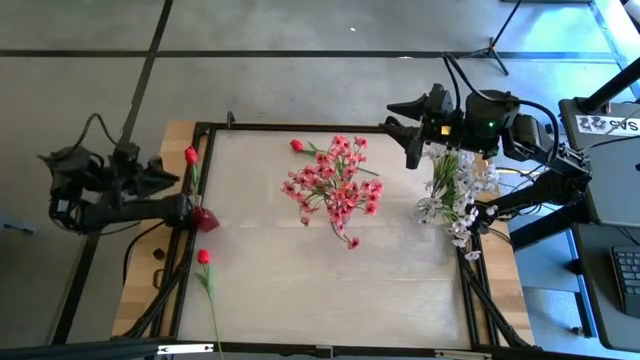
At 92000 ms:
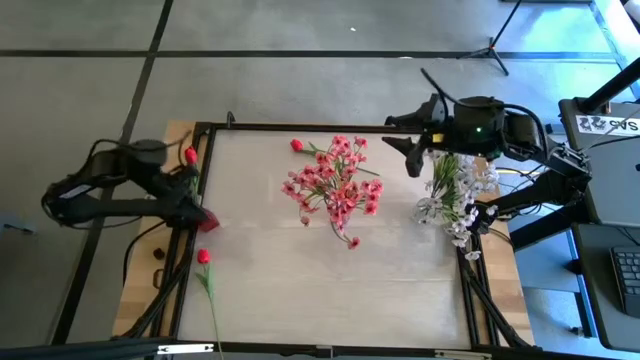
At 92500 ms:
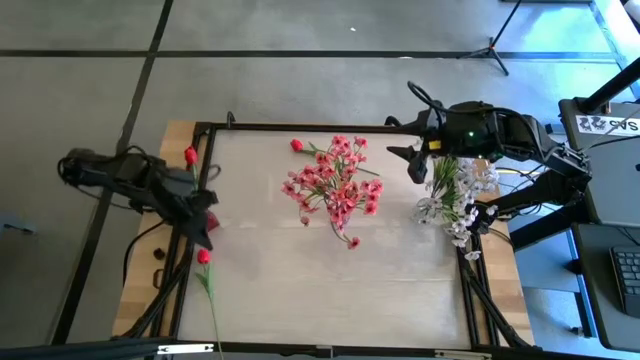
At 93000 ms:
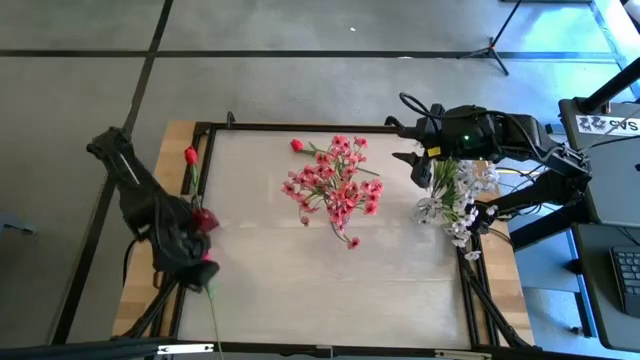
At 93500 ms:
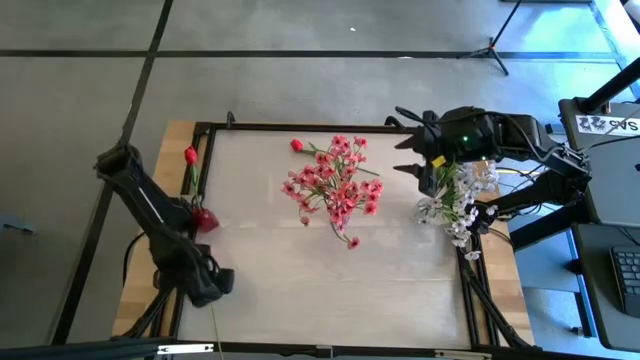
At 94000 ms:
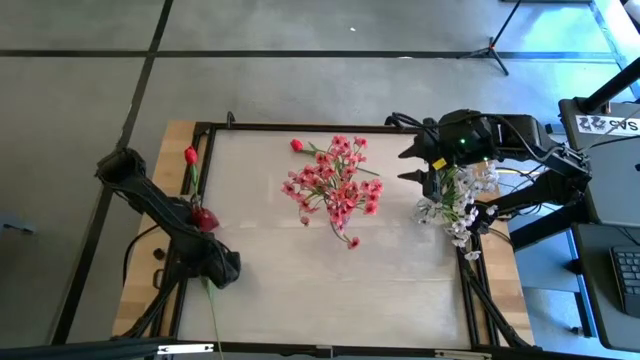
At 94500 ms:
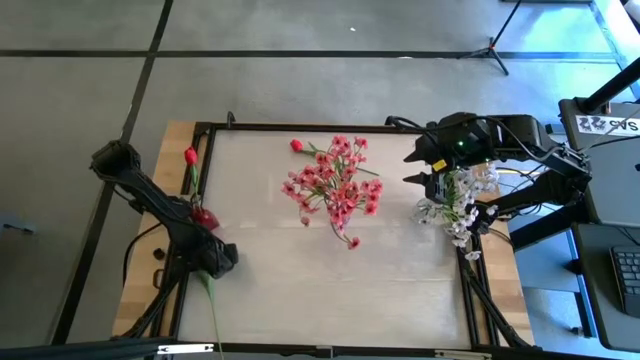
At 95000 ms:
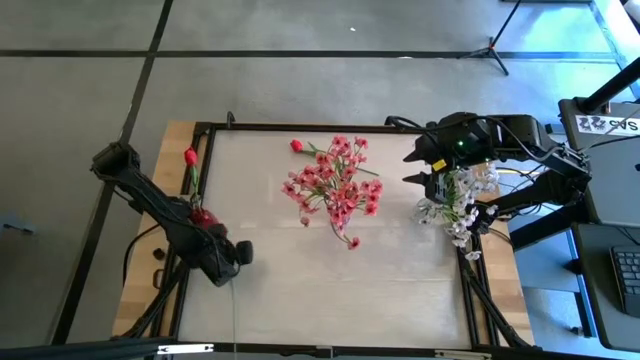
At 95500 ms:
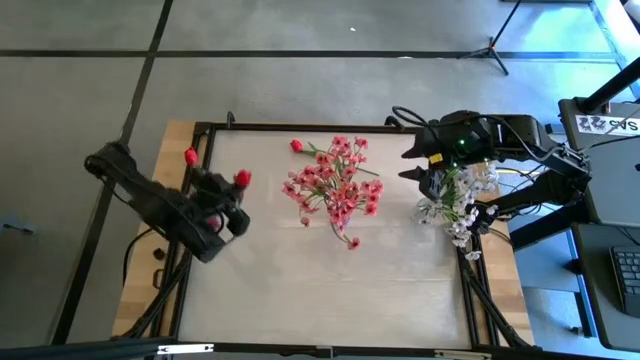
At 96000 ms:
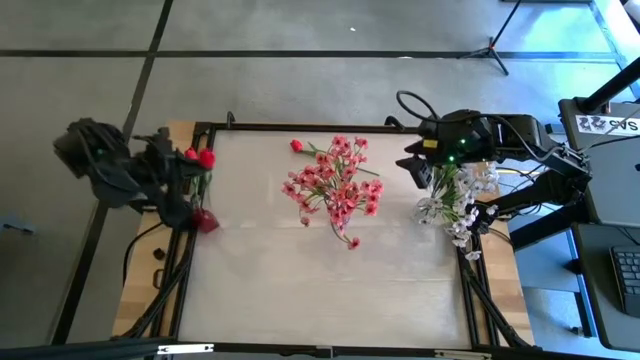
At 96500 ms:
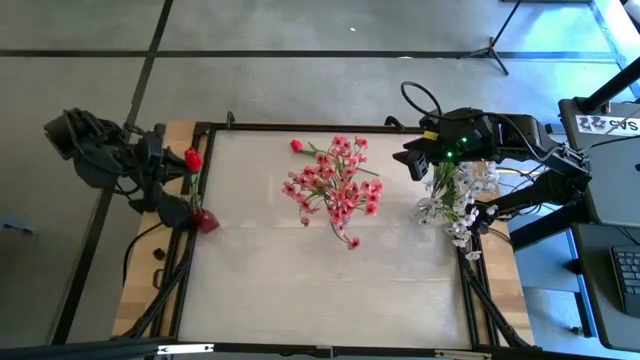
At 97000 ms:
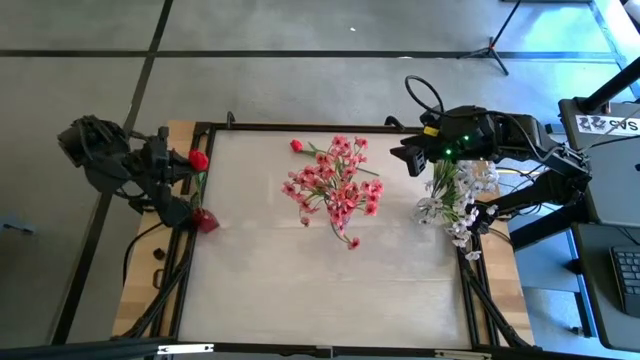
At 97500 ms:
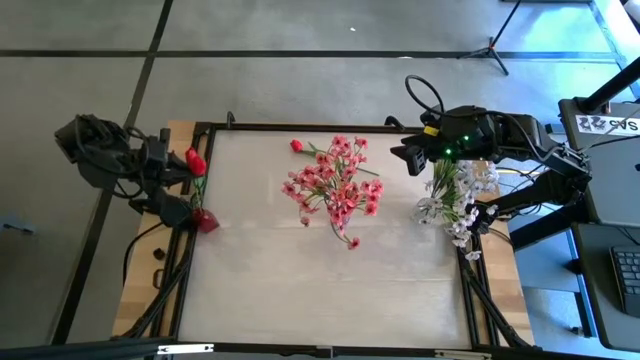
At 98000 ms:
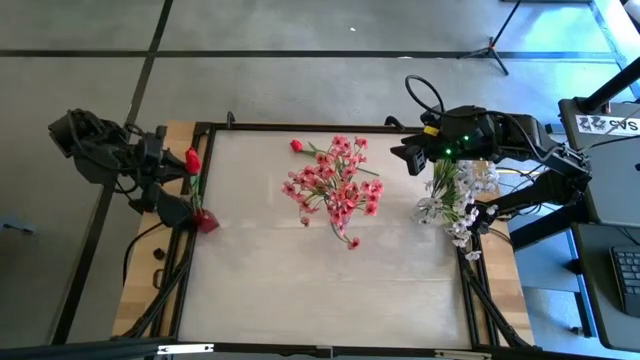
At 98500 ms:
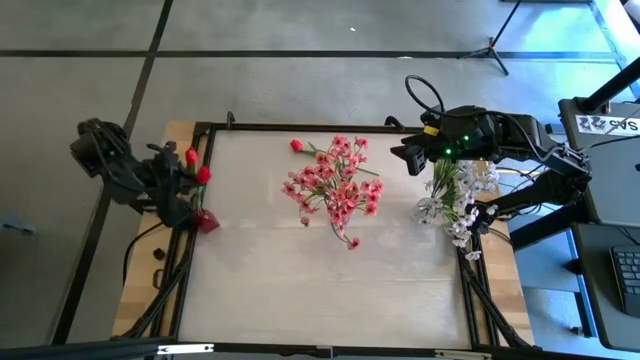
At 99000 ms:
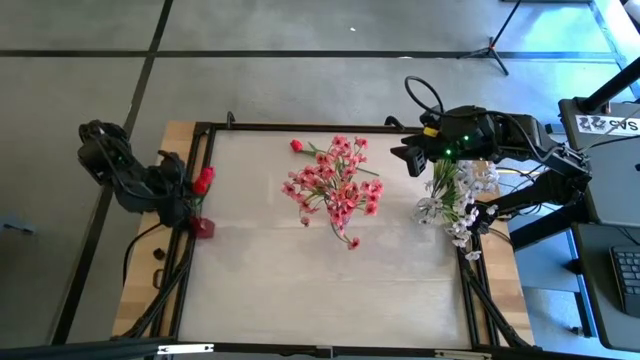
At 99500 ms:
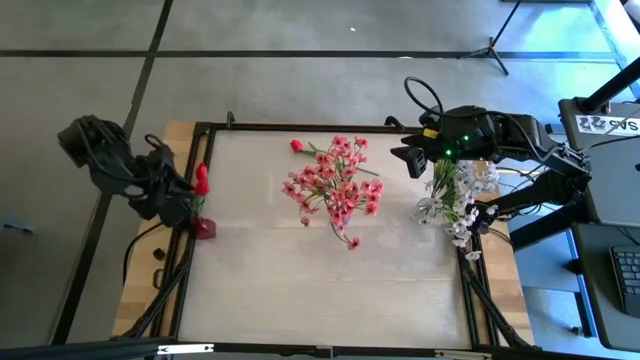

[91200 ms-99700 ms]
Task: Sort flowers into vase by color
Put the bottom red flower into the red vase

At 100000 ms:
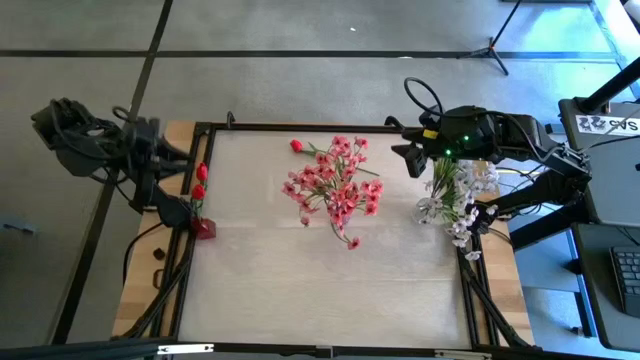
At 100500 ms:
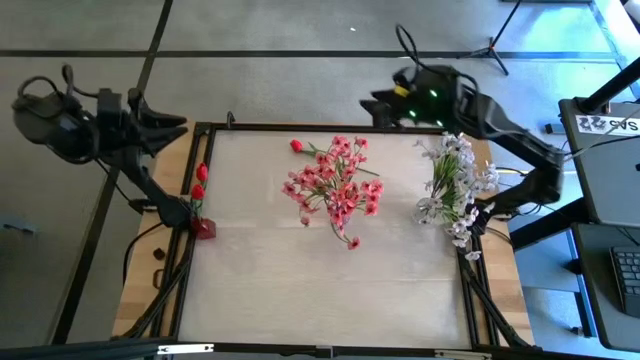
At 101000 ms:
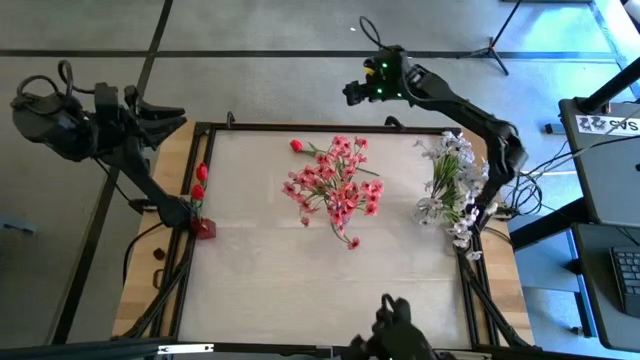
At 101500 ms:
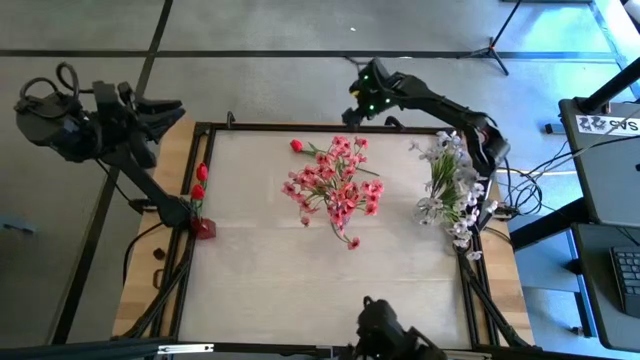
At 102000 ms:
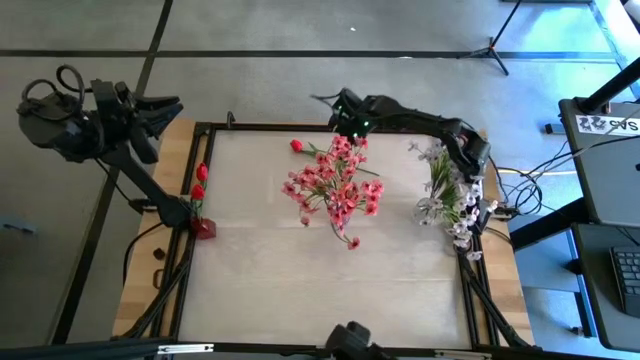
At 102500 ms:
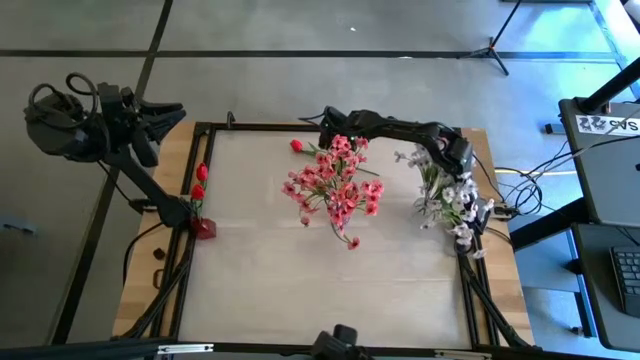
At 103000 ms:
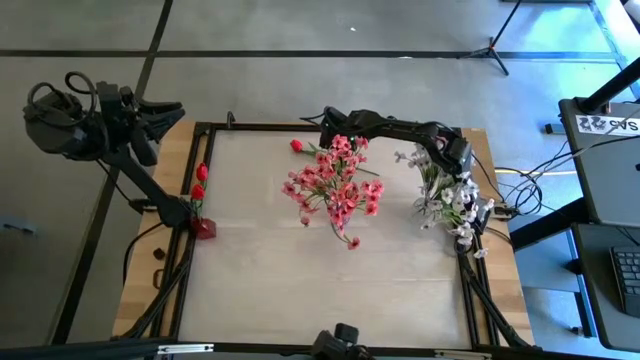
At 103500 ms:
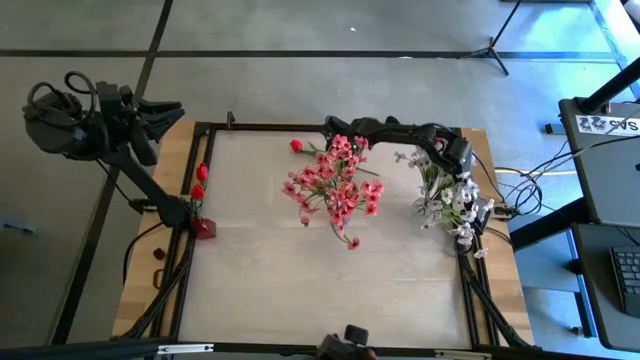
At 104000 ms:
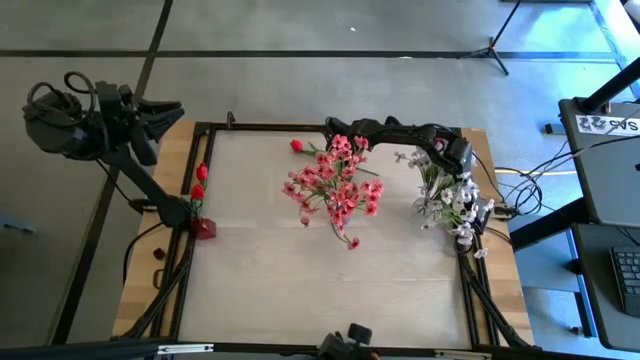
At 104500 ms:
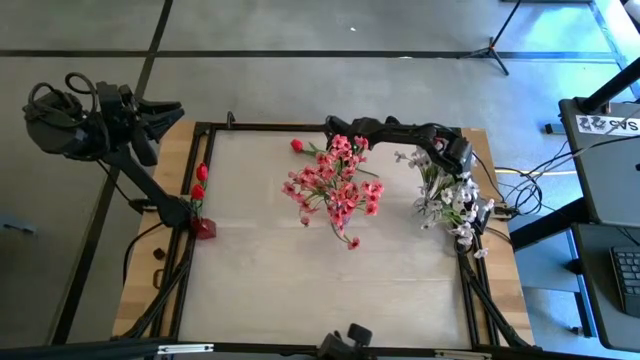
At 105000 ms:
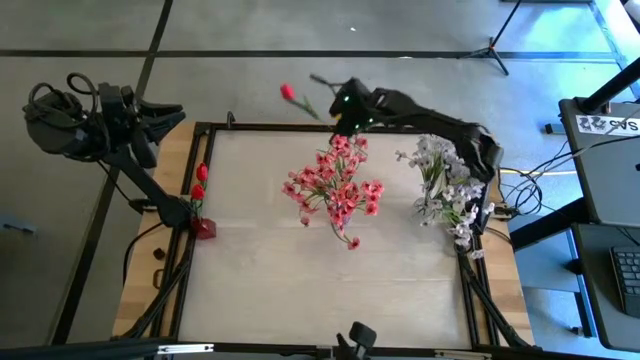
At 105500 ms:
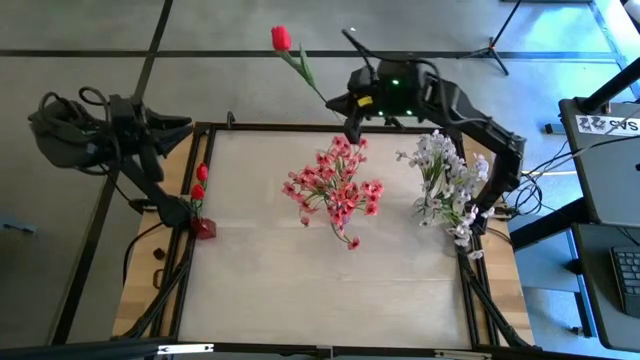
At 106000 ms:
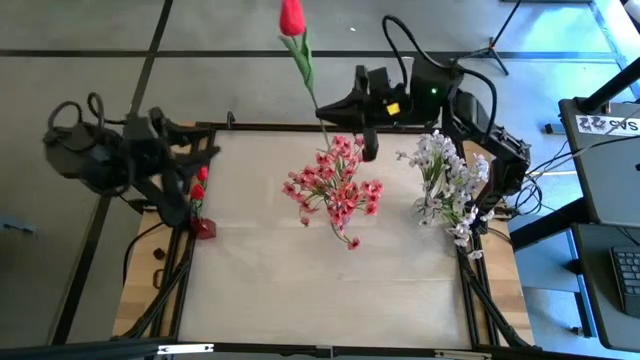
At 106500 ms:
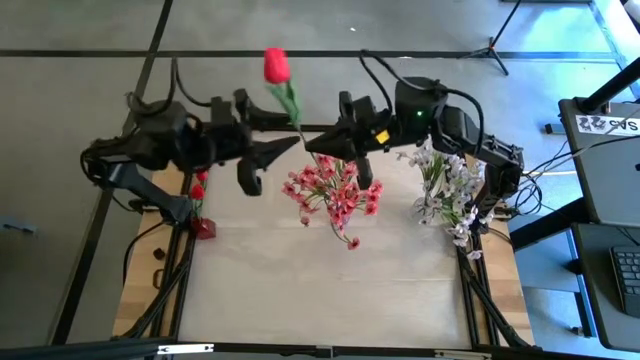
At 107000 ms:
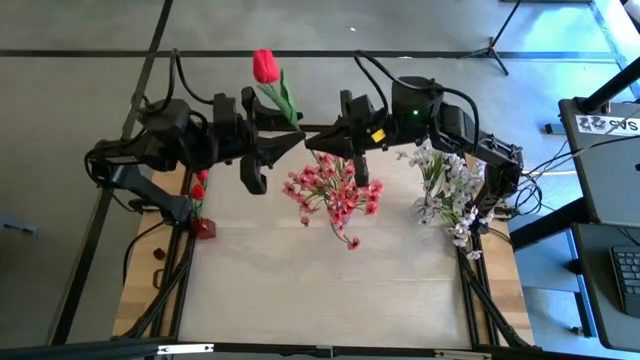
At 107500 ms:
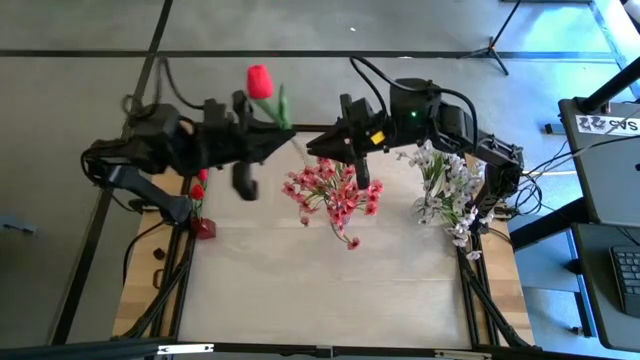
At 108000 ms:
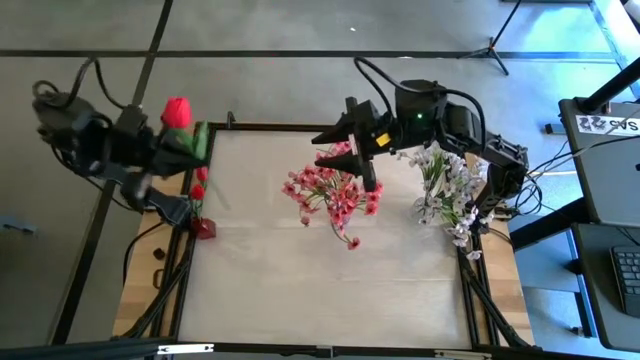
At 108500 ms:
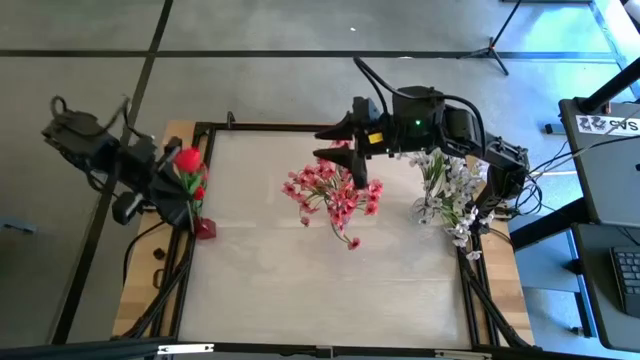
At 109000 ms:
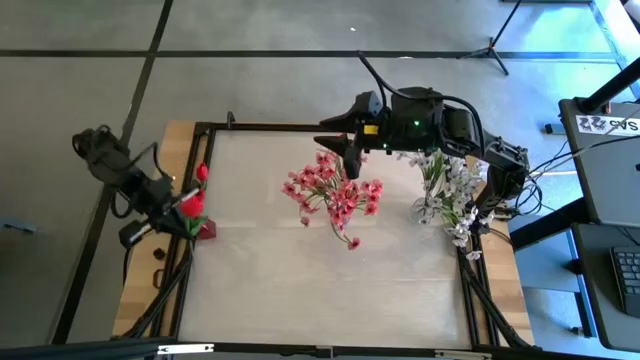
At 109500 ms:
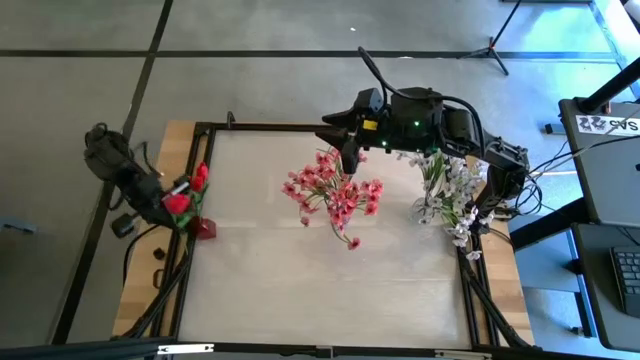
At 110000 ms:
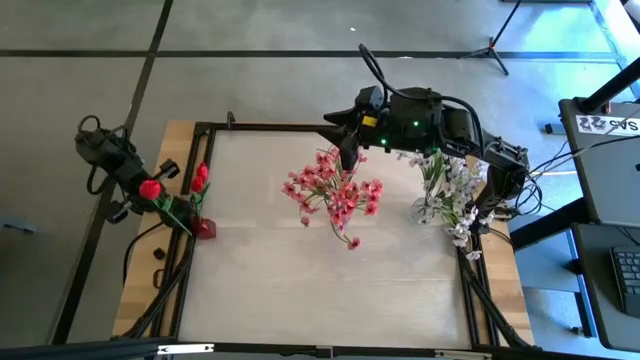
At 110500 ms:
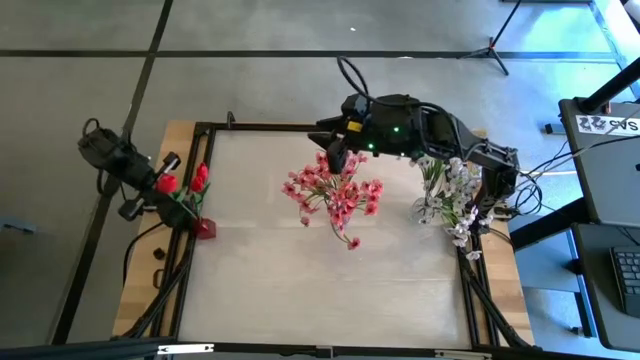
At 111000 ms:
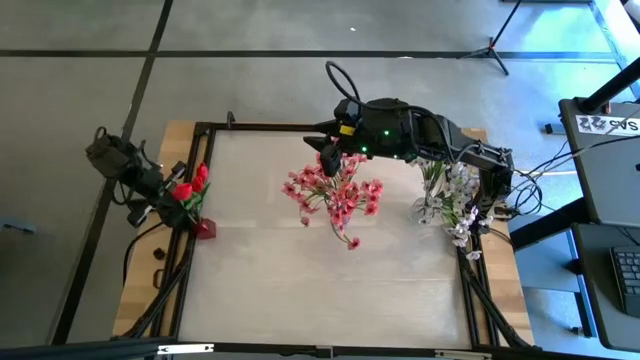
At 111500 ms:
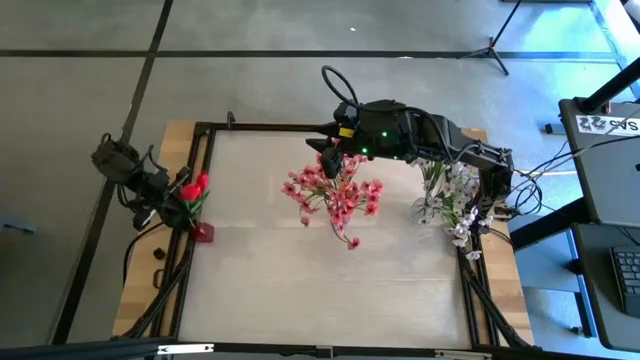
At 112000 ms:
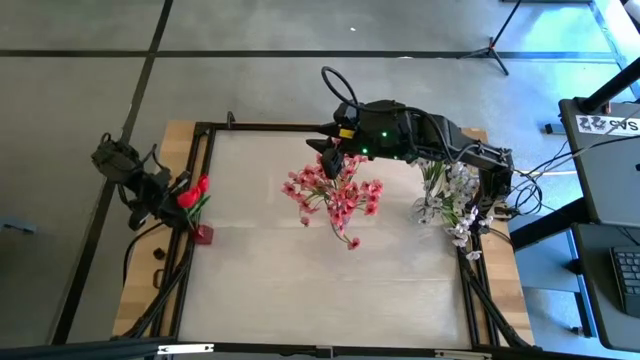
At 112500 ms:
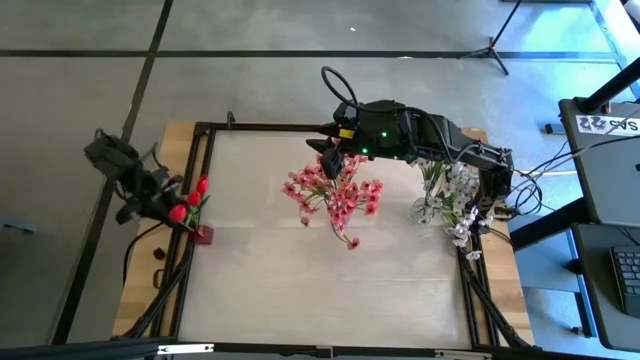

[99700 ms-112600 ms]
Put the red flower into the red vase
